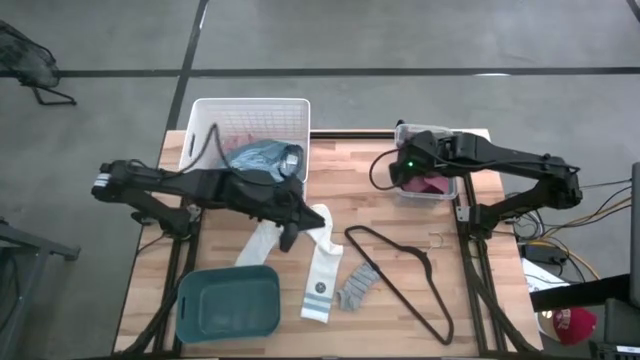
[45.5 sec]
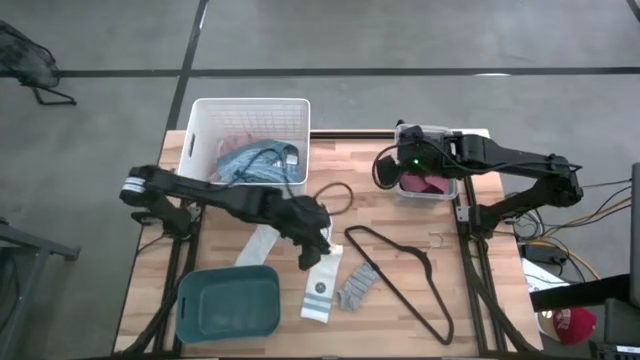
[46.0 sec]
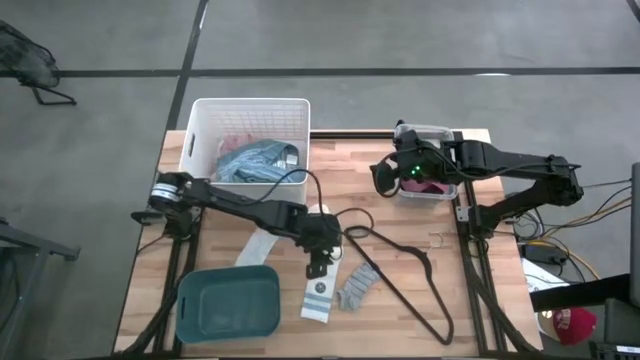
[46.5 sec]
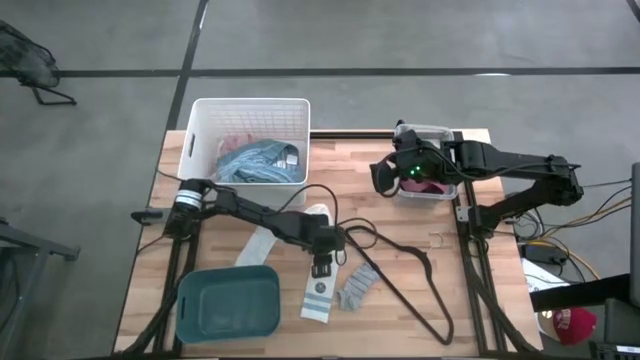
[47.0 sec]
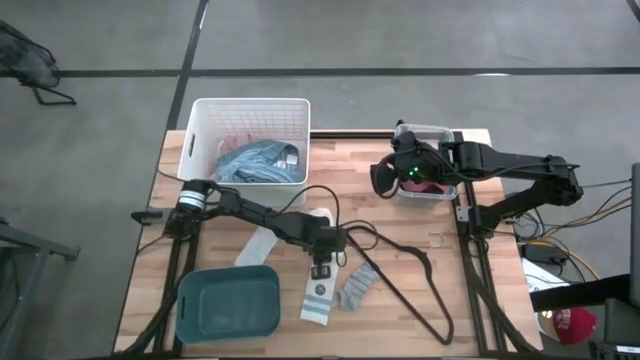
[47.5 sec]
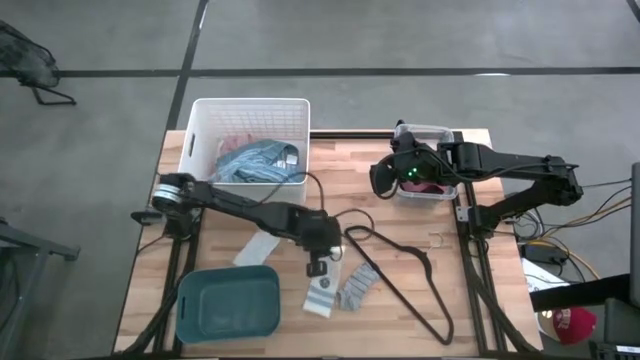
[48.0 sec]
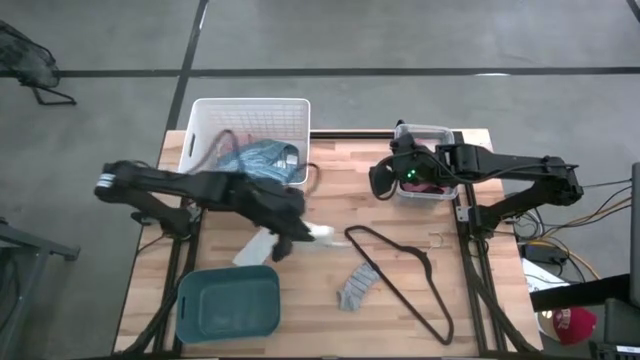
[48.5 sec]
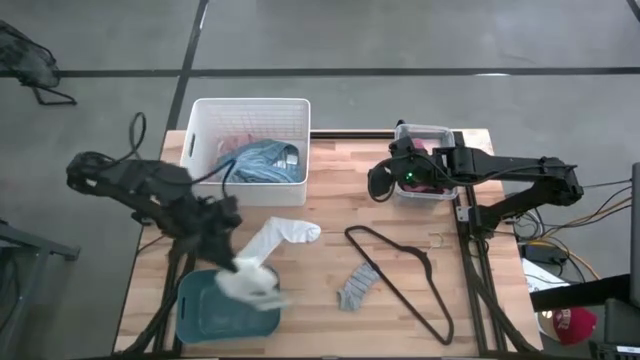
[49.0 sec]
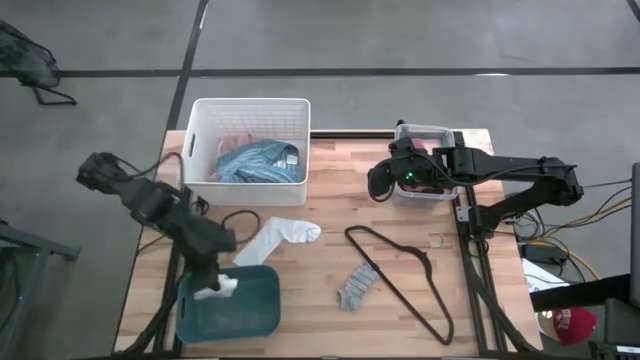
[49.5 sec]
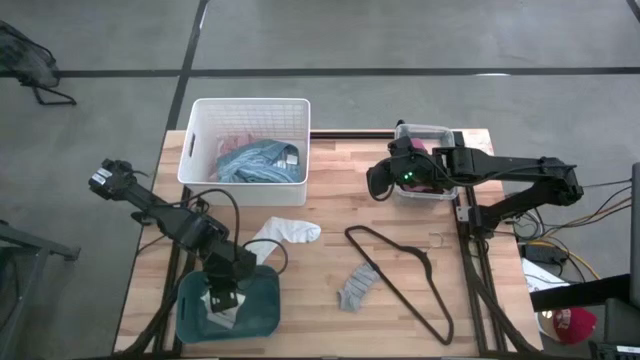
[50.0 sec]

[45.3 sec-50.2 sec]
Task: Pick & Place Cloths
Put the right white sock into the blue bin

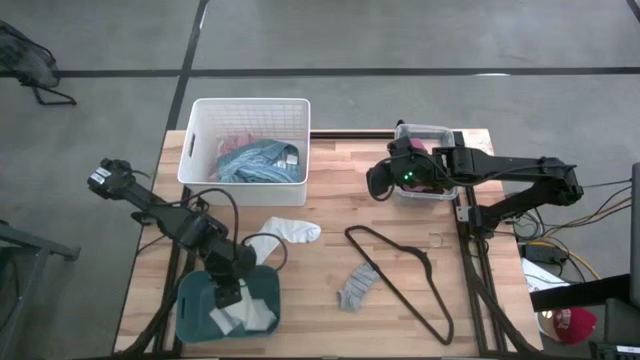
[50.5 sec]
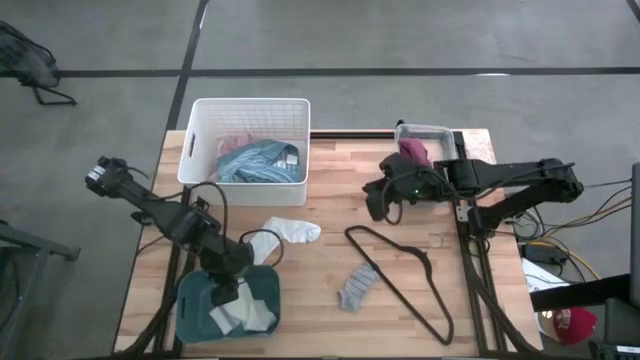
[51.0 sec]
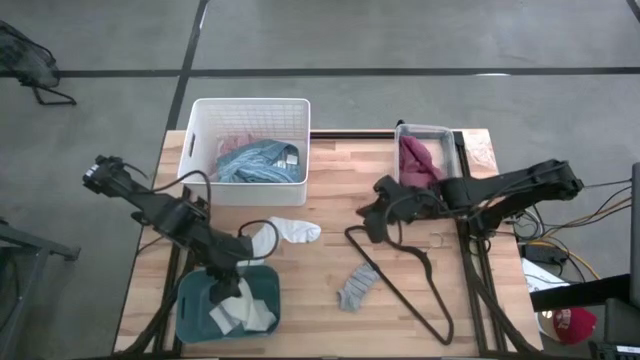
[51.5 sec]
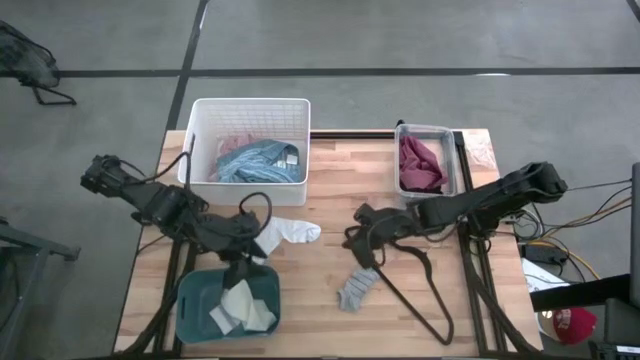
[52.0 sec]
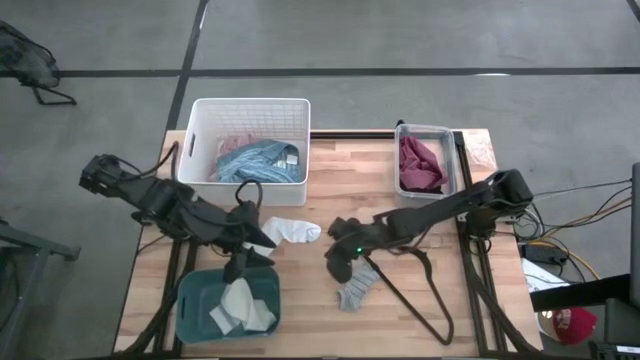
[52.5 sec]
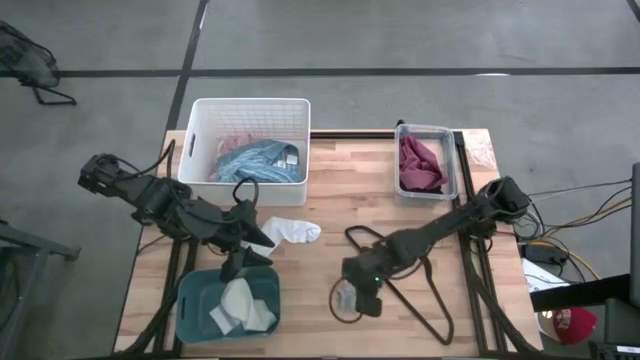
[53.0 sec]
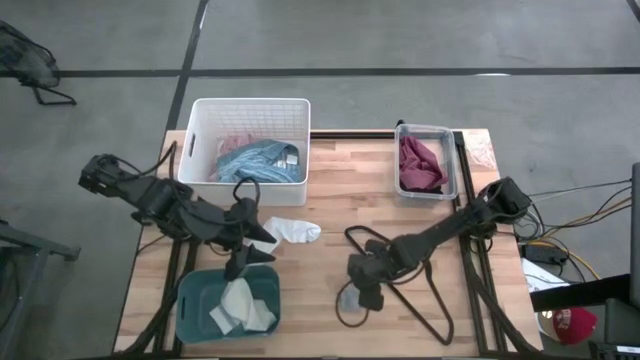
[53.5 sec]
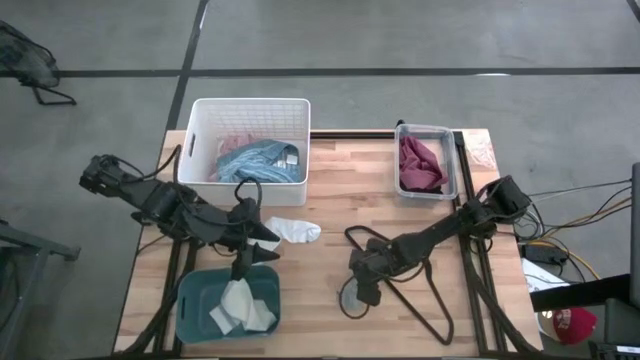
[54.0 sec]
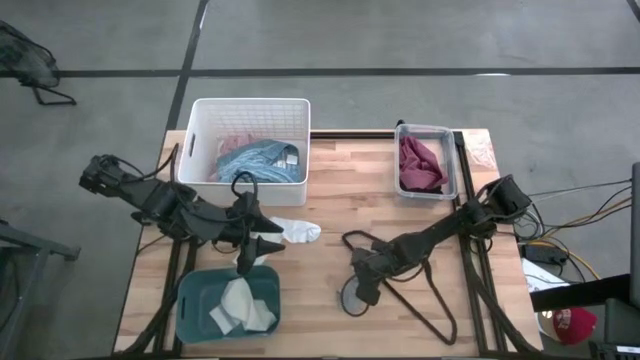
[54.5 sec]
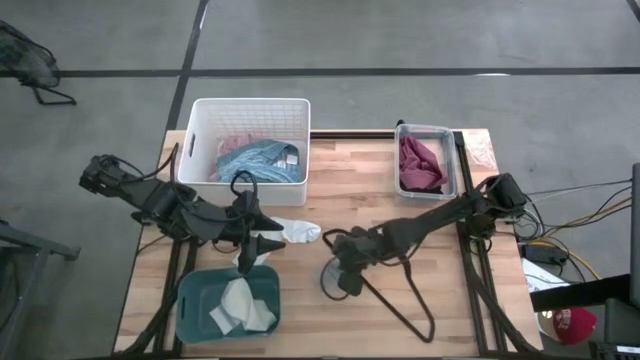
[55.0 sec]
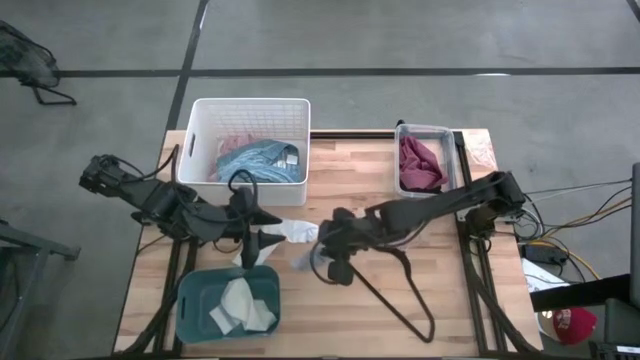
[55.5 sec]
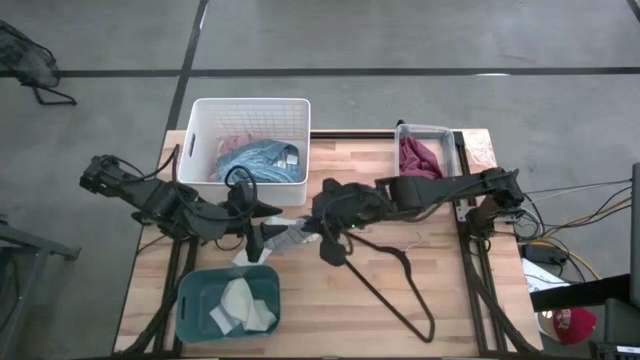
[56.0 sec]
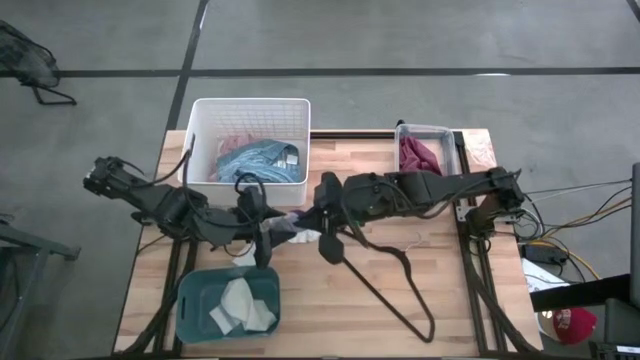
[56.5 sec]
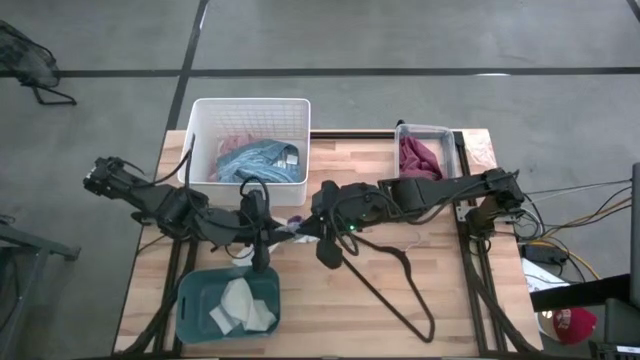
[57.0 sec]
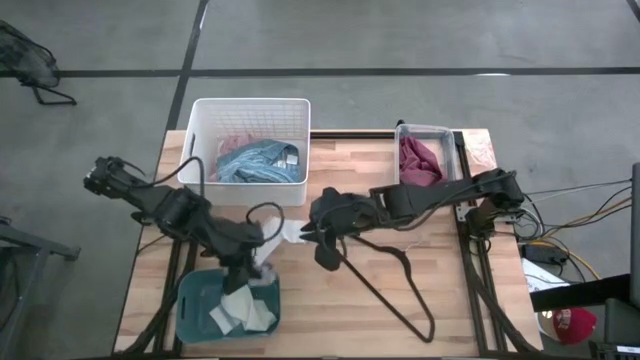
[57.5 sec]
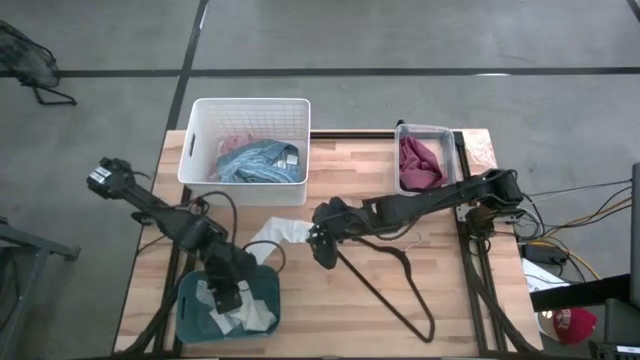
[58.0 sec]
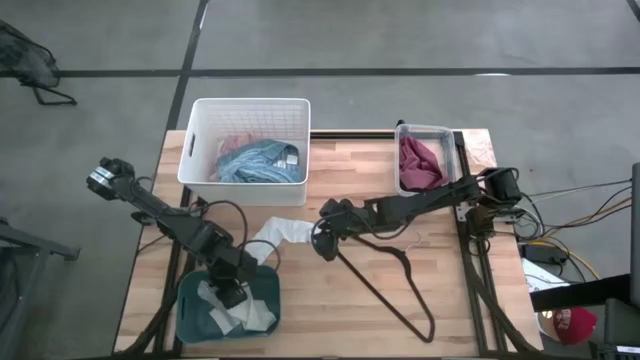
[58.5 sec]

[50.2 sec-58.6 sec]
Put the gray sock into the blue bin

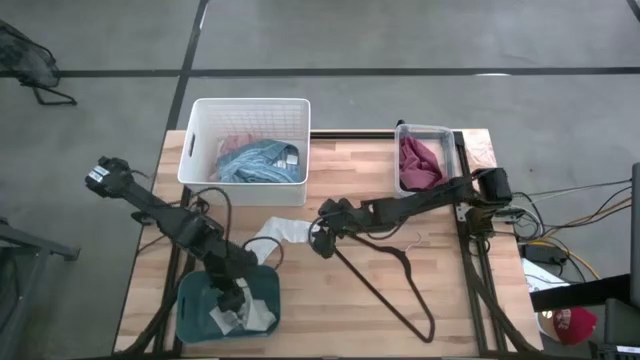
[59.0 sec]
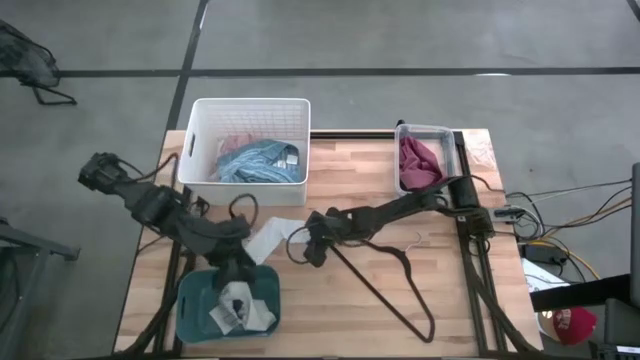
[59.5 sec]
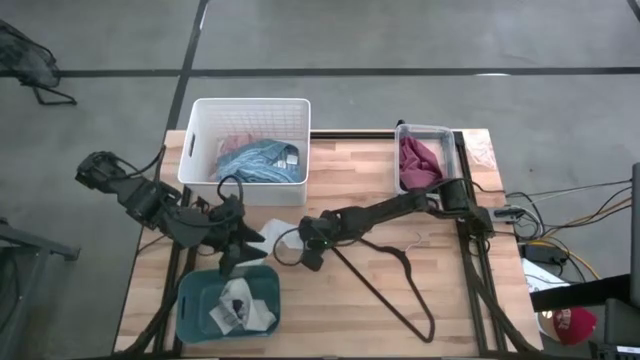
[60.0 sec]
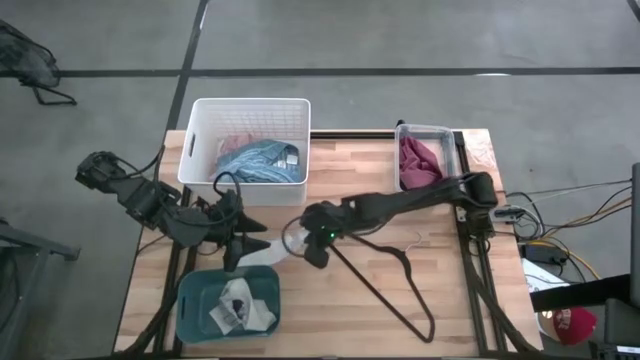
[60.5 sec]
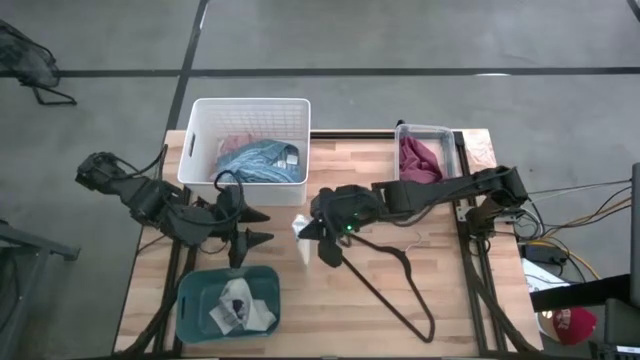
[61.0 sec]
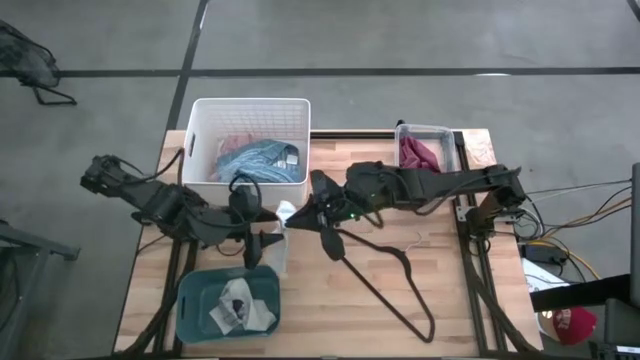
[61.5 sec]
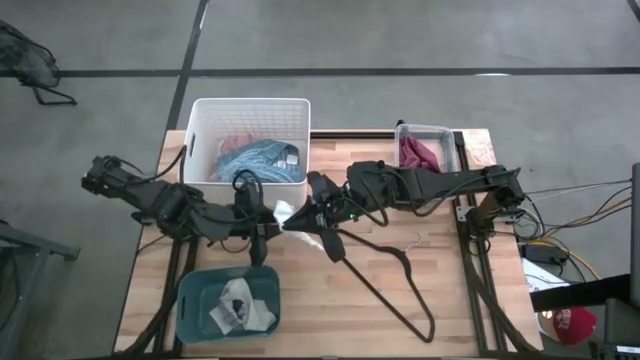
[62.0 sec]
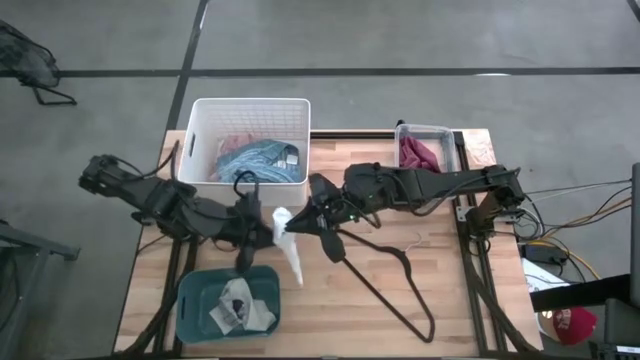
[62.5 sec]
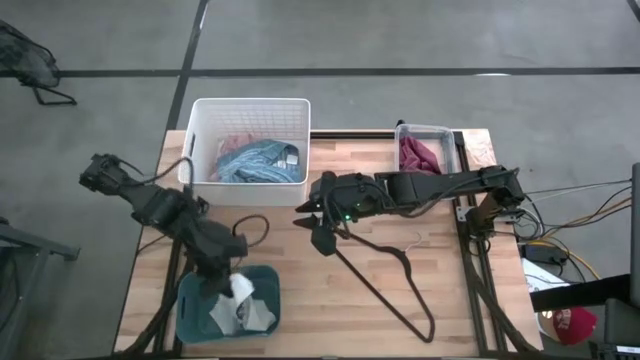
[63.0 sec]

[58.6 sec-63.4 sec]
Put the white sock into the blue bin

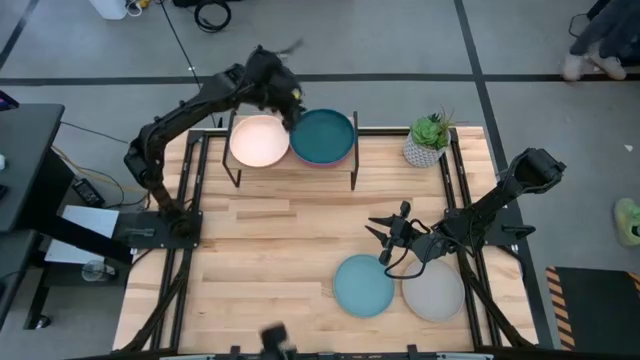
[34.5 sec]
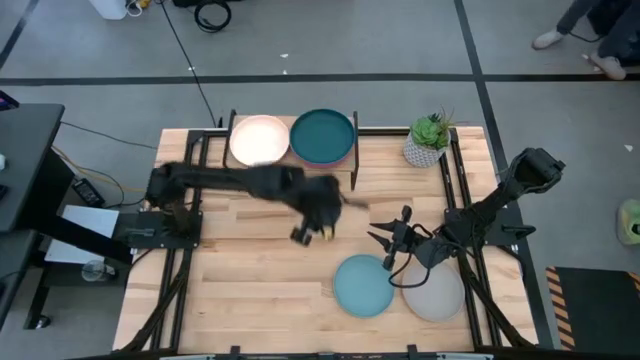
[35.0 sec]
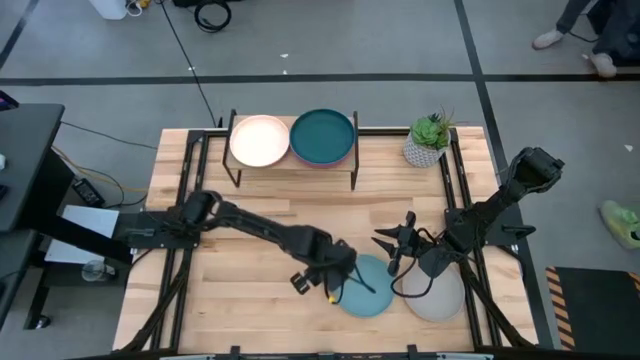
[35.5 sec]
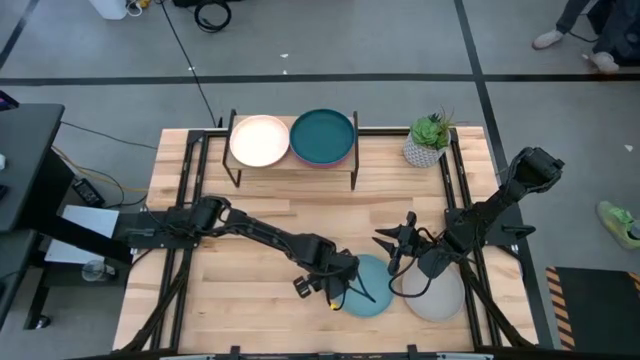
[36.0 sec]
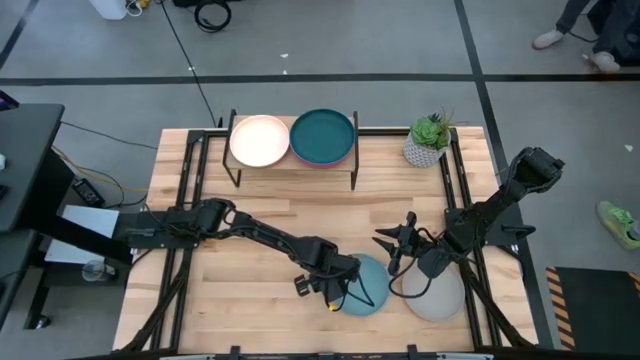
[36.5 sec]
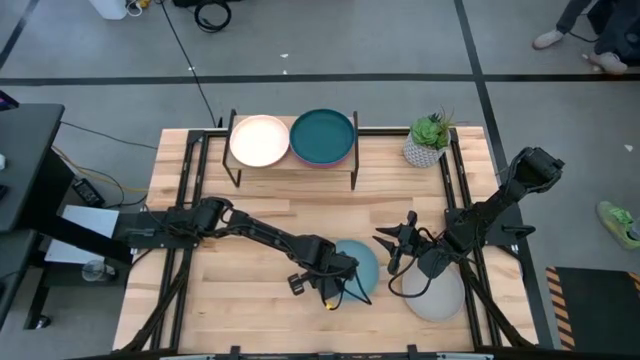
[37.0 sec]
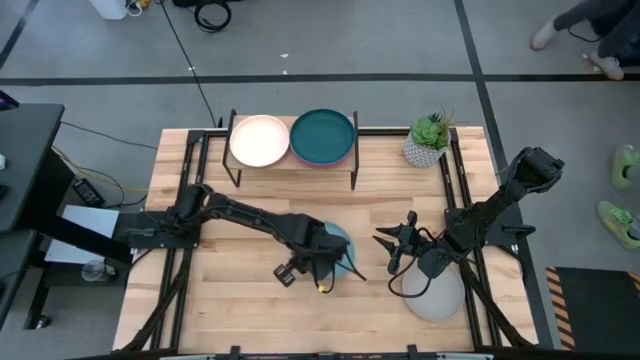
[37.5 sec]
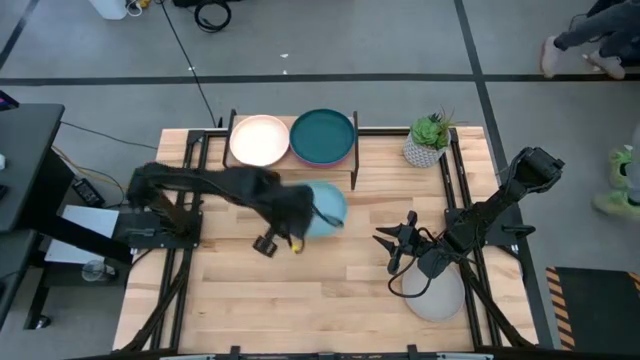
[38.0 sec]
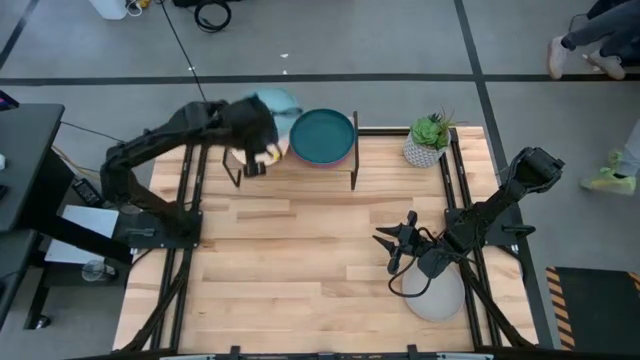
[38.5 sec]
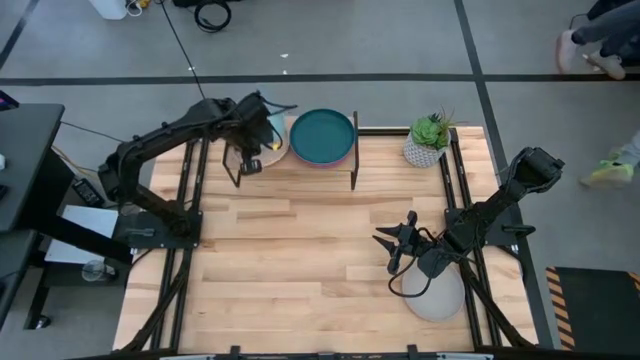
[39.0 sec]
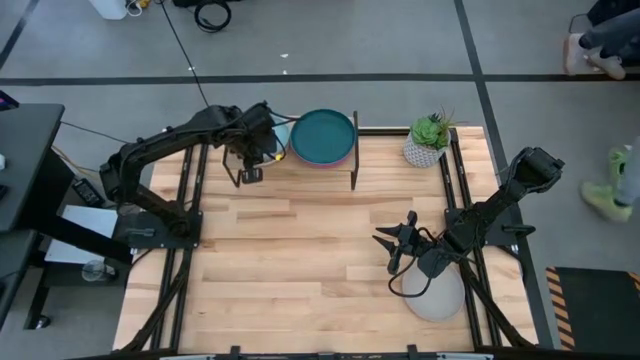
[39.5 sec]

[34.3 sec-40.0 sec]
Task: Place and stack plates onto a shelf
Stack the blue plate on top of the light orange plate on the shelf
